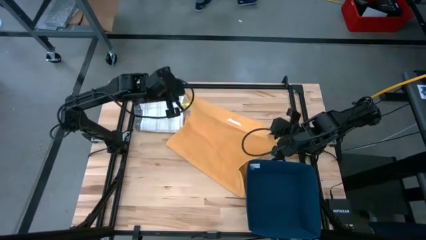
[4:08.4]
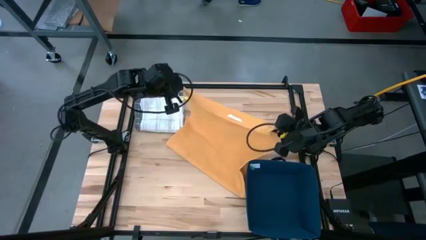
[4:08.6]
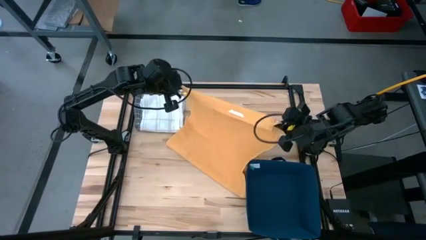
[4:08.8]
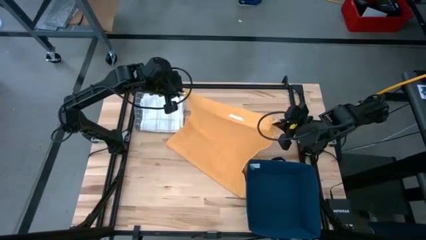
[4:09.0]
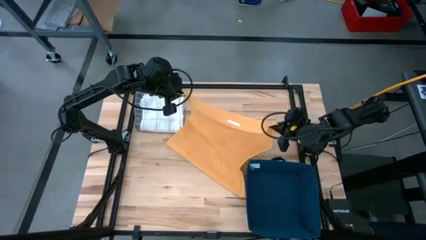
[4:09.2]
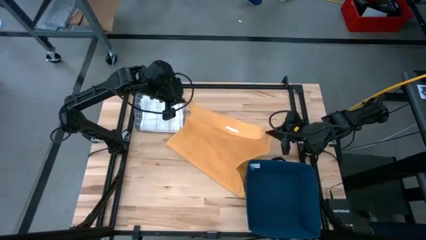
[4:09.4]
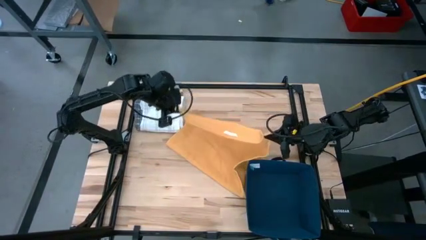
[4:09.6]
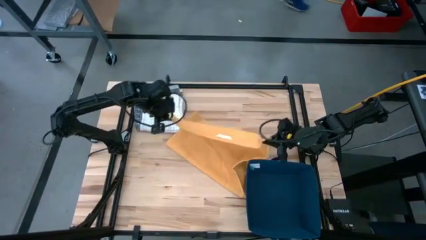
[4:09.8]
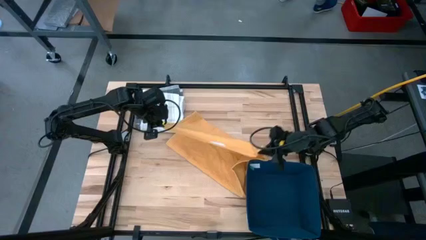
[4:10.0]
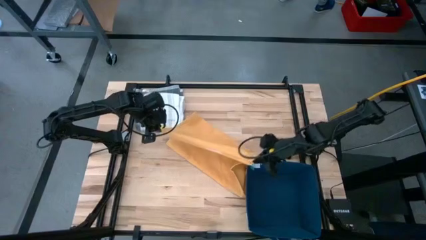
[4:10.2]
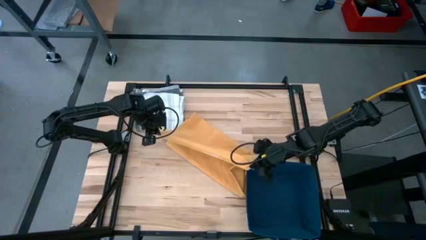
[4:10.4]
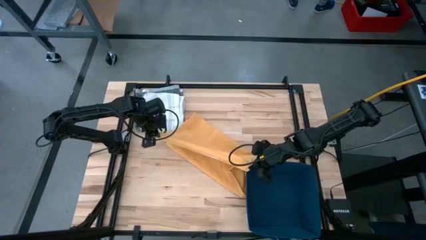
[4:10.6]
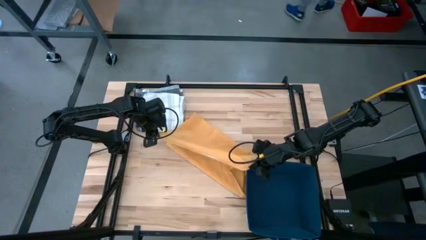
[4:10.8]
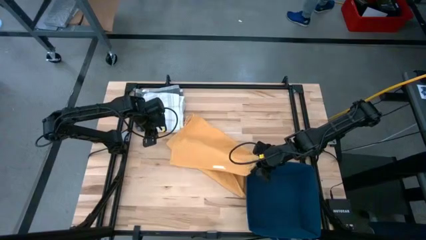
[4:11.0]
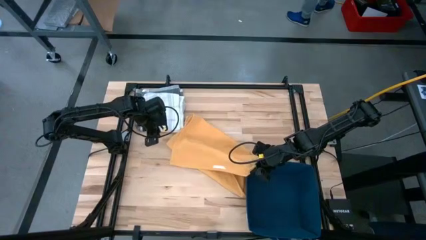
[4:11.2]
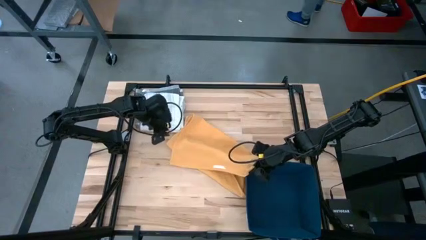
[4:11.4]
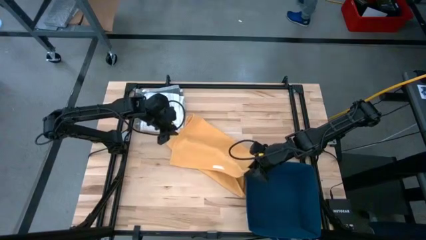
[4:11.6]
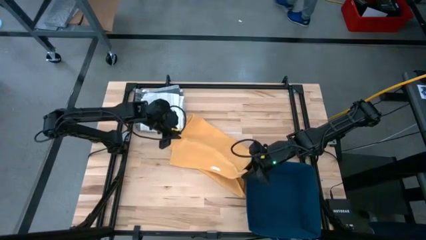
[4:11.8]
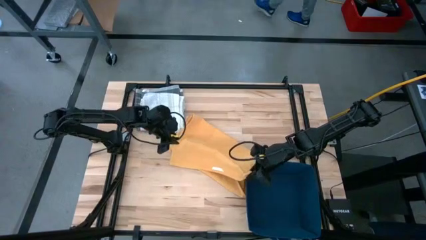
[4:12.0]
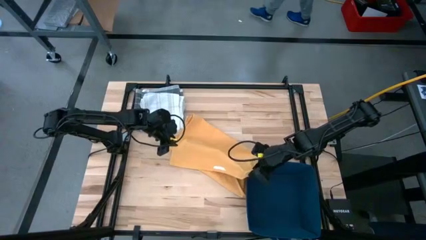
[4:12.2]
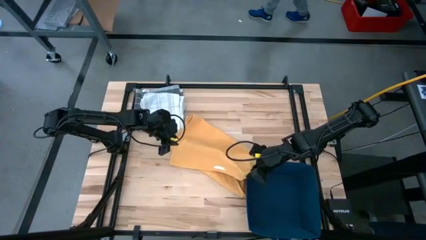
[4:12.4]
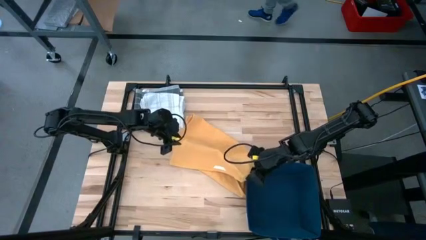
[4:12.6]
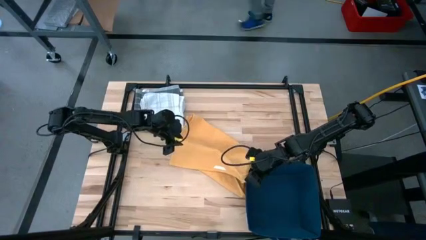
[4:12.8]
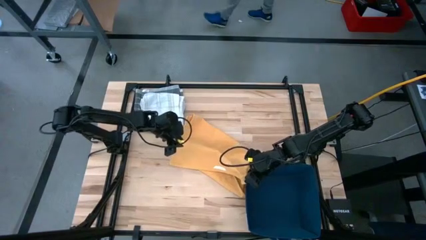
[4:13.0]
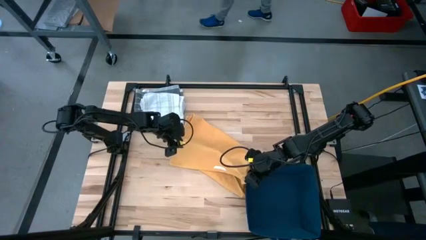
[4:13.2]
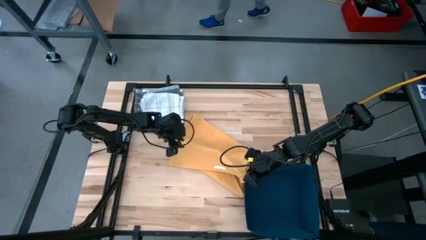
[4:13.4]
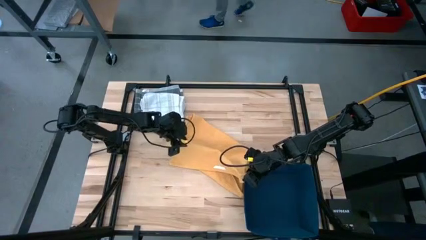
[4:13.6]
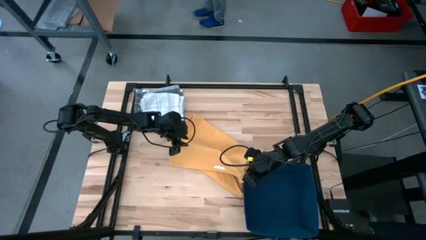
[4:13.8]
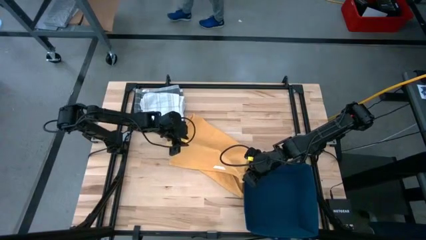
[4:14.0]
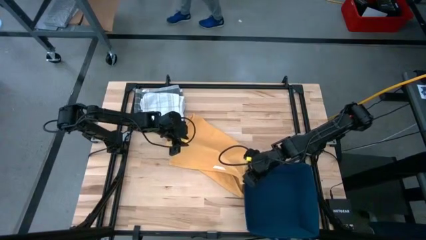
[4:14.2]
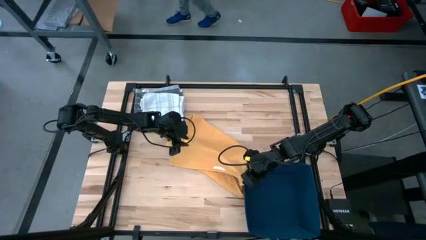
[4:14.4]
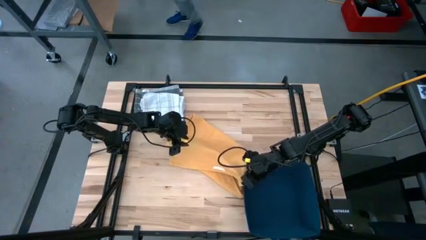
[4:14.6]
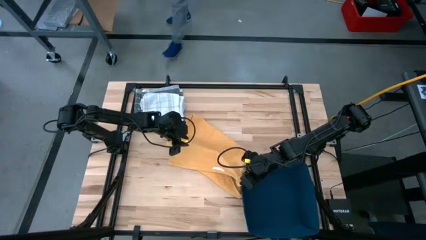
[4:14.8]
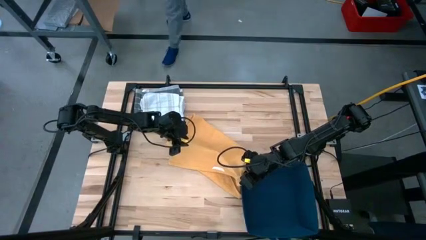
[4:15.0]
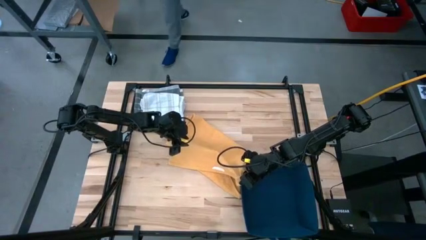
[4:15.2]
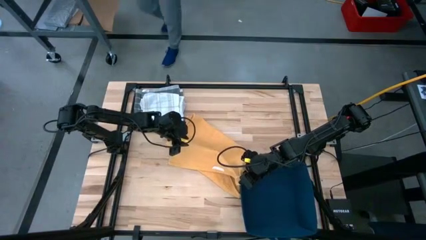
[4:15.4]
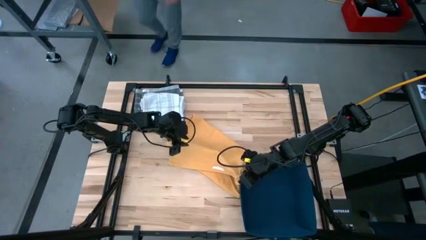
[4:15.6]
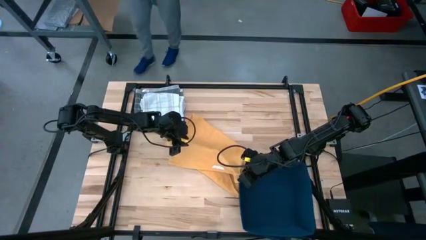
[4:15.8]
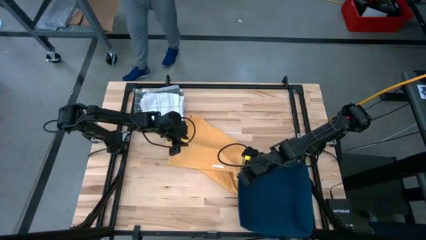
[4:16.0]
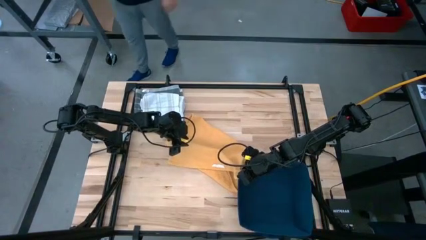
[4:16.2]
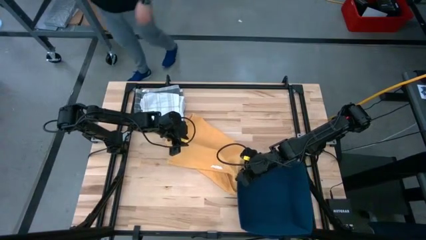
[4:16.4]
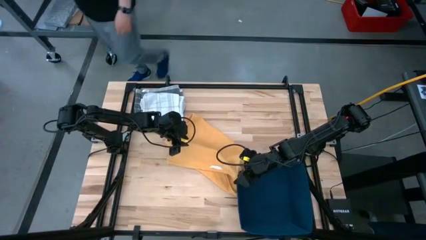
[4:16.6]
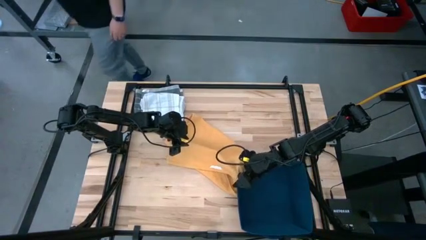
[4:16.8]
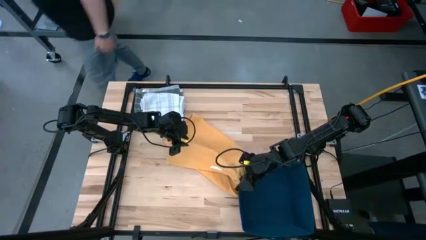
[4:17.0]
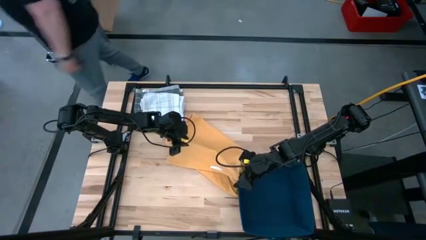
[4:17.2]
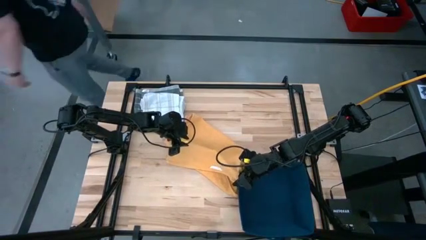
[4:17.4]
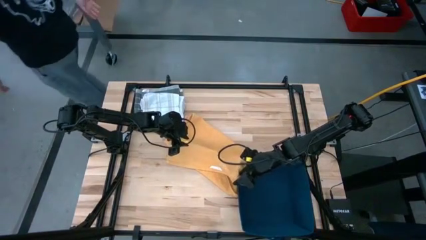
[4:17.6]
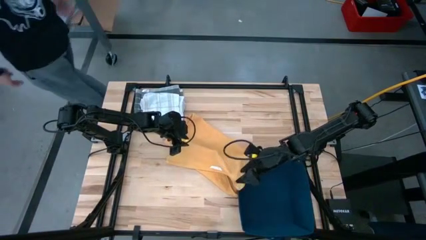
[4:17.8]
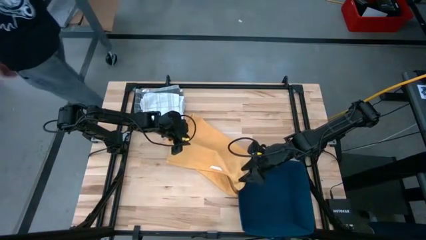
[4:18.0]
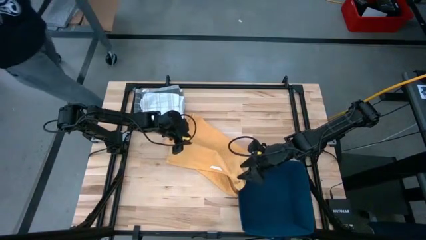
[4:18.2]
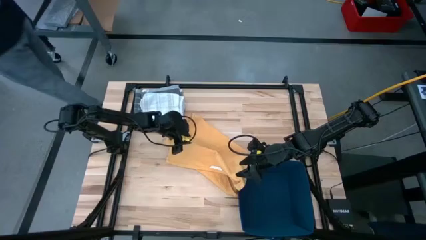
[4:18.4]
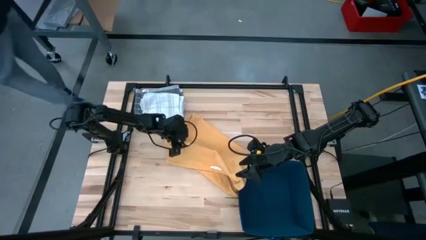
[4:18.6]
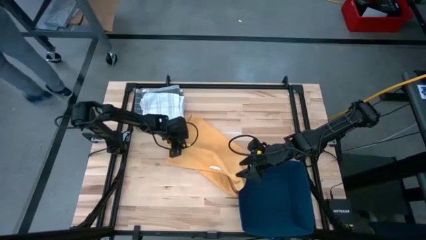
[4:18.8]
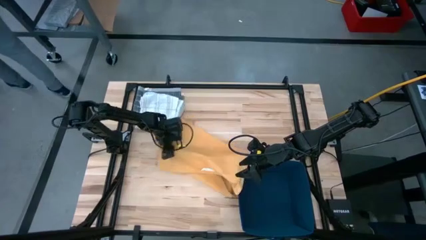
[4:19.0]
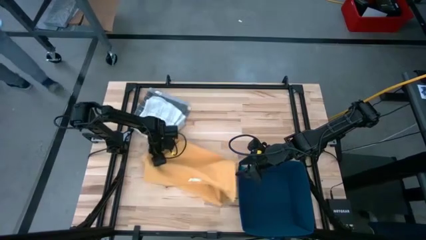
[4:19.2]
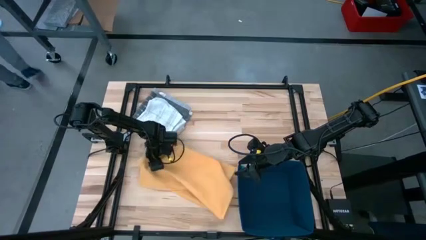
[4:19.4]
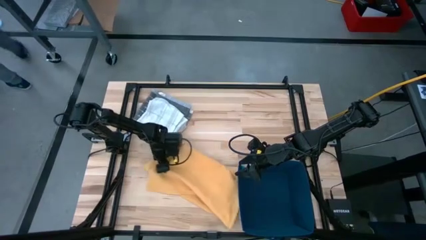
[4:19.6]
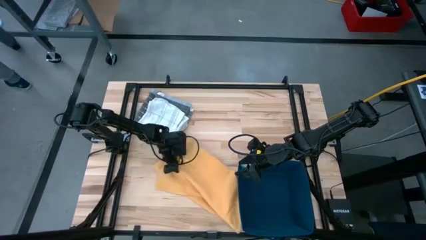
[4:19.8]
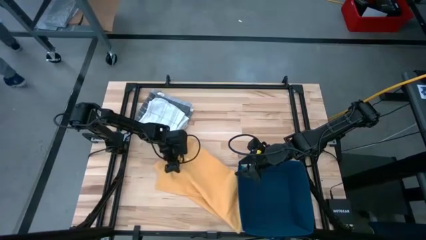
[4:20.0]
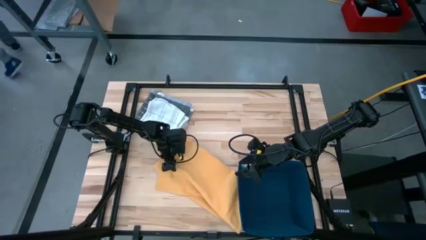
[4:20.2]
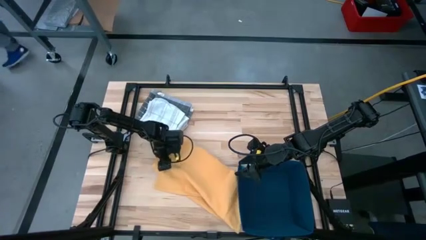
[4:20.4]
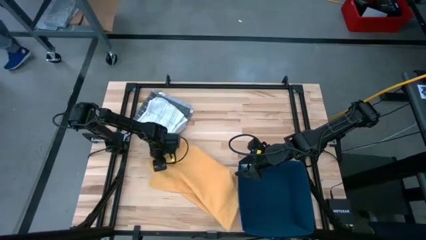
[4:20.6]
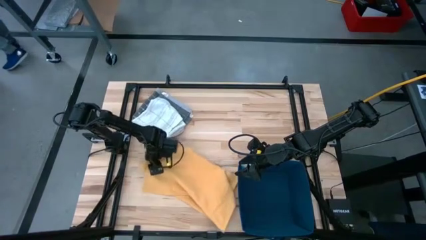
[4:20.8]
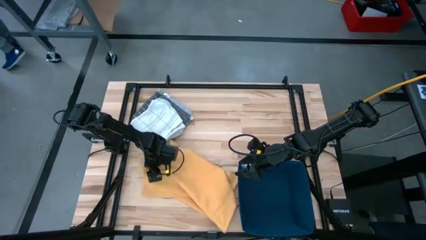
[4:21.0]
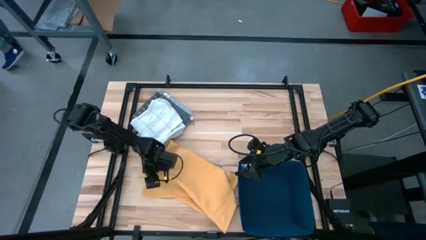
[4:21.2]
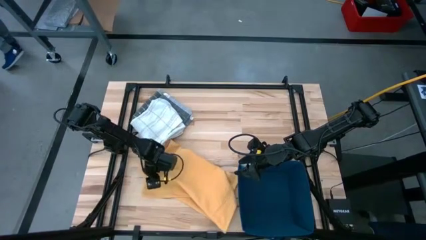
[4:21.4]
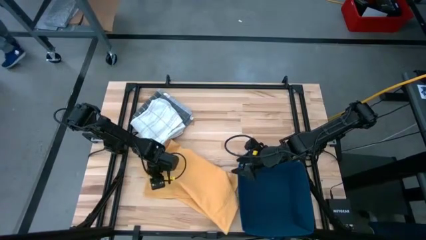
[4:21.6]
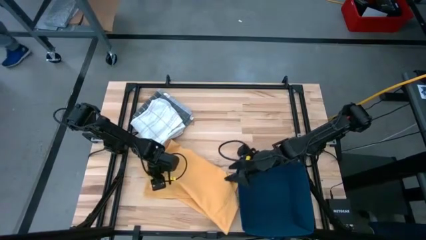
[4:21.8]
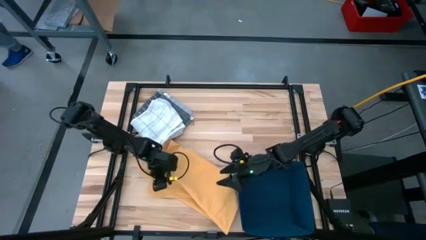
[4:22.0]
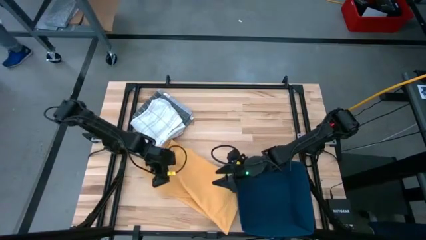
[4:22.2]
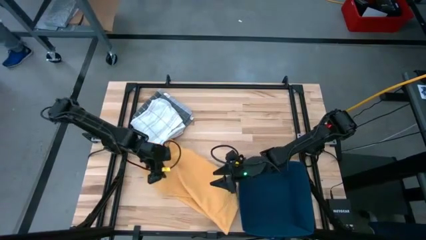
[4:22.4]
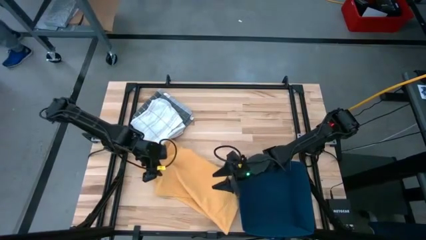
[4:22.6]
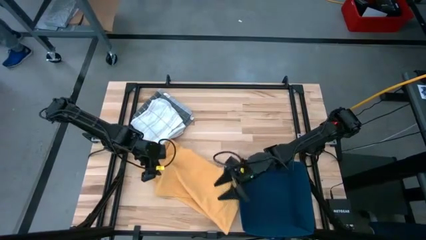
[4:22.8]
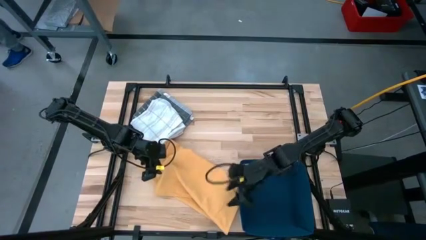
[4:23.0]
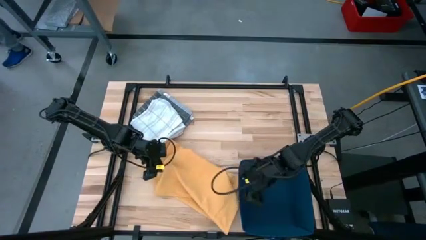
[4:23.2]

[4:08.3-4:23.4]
Task: Fold towel
Fold the yellow towel

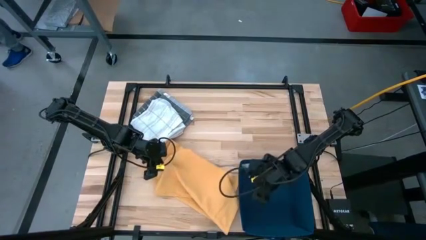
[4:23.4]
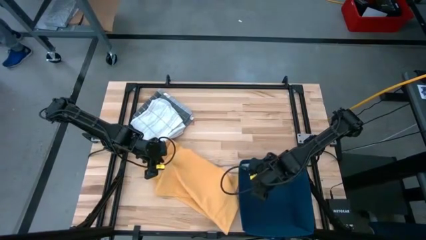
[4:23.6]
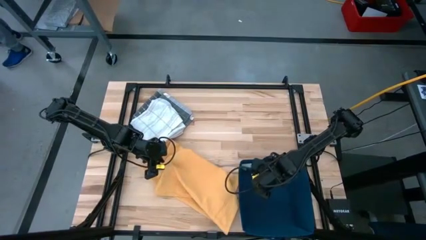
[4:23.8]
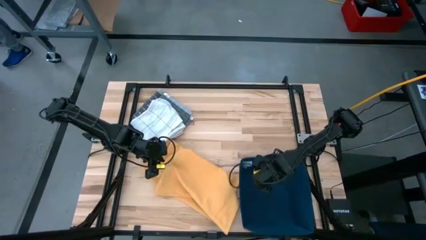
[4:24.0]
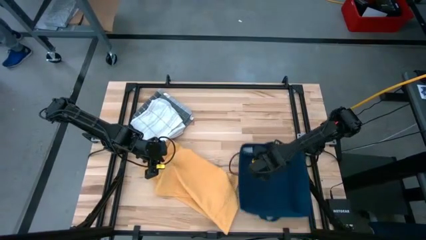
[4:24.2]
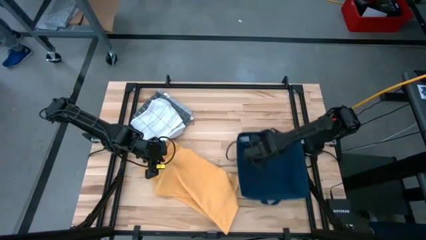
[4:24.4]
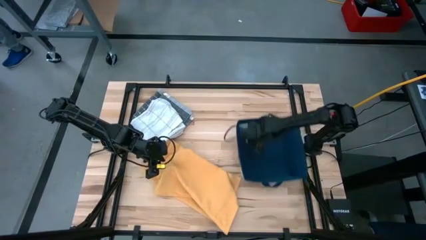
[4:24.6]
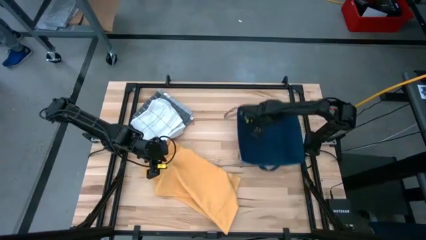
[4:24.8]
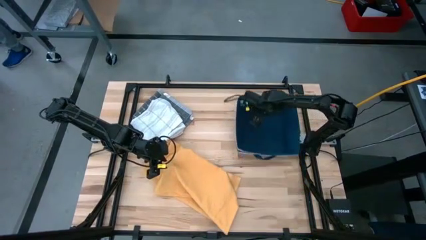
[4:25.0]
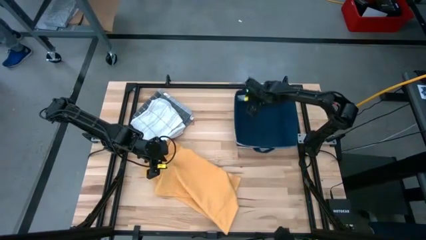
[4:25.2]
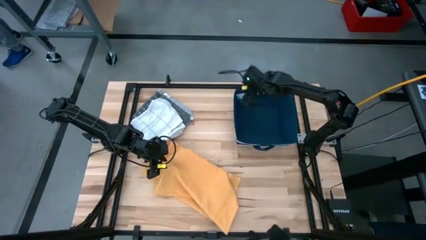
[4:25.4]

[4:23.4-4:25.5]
Move the blue laundry organizer to the top right of the table

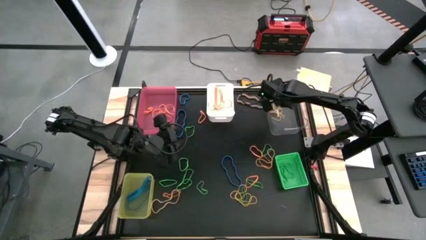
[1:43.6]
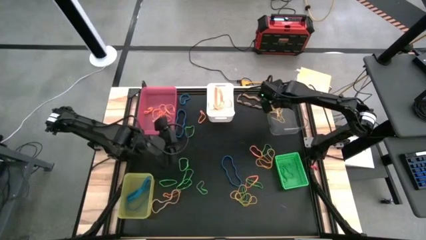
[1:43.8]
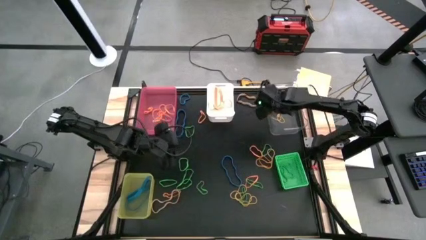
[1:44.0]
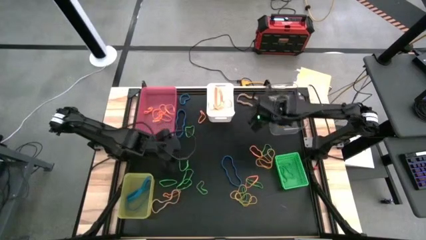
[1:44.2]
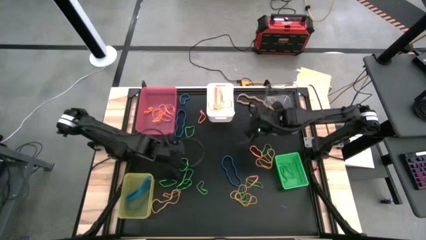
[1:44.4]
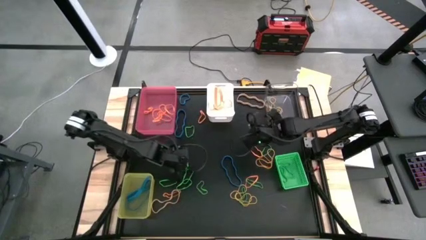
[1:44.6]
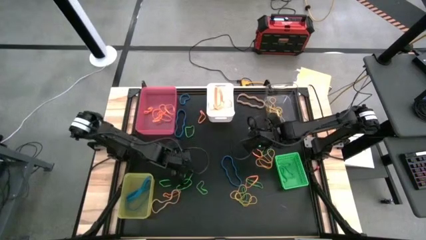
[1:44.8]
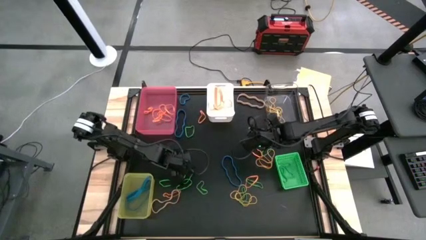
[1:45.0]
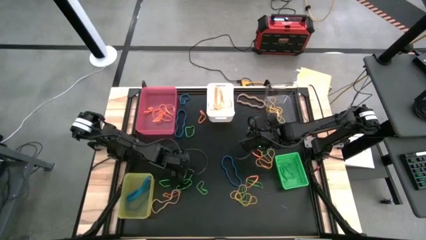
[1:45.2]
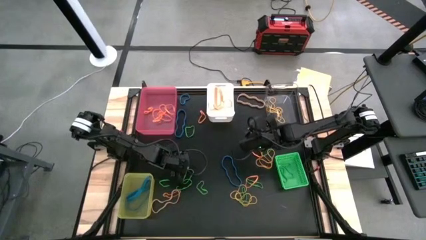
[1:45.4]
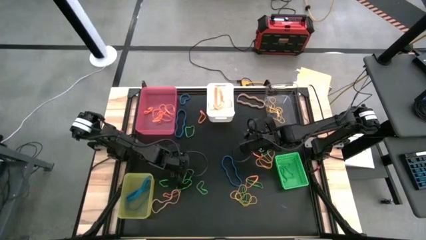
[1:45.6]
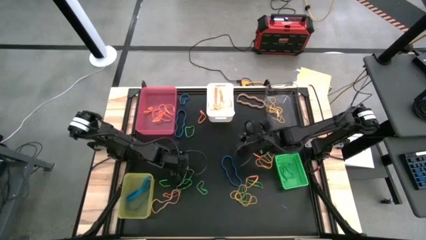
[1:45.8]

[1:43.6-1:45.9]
Task: Sort rubber bands into baskets
Put the green rubber band into the green bin
